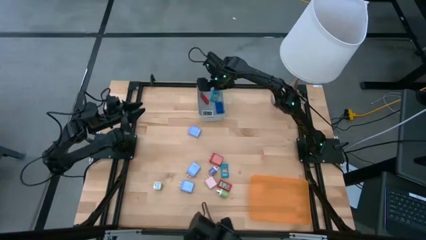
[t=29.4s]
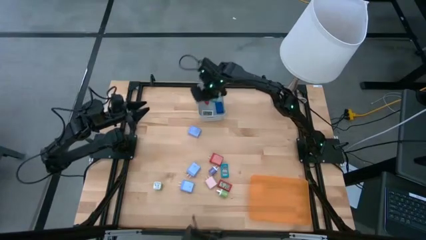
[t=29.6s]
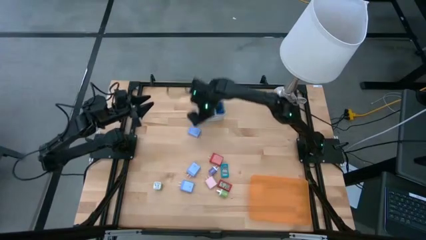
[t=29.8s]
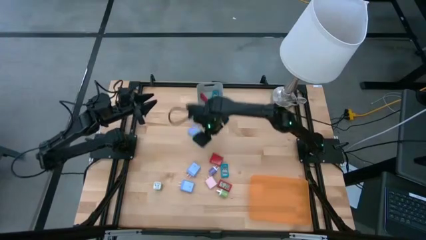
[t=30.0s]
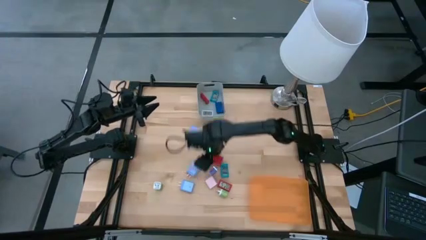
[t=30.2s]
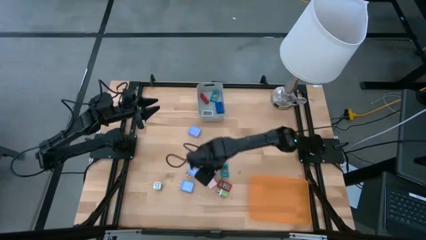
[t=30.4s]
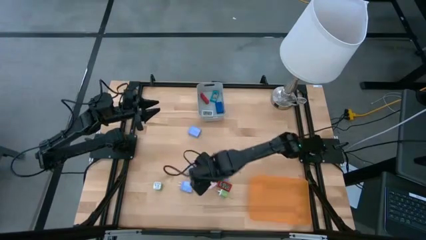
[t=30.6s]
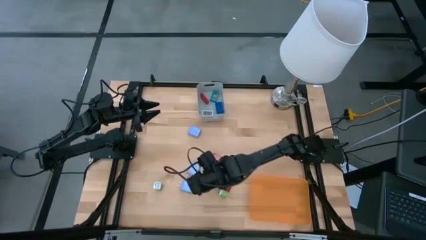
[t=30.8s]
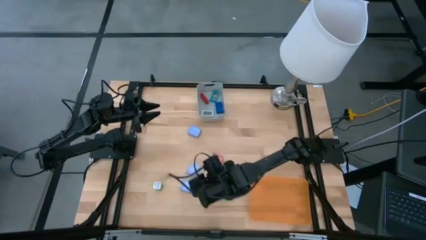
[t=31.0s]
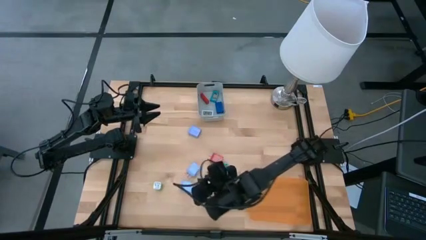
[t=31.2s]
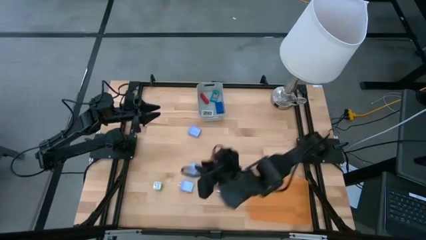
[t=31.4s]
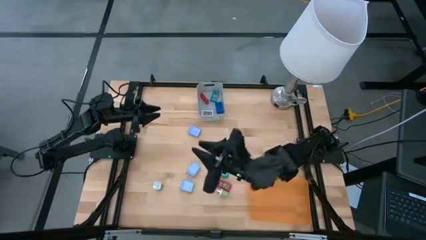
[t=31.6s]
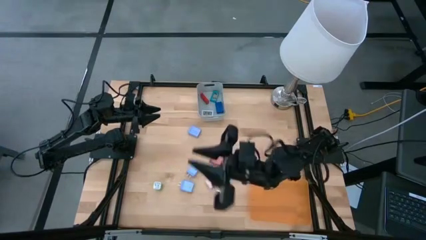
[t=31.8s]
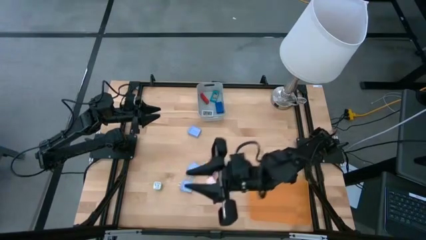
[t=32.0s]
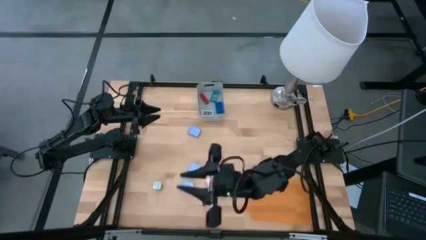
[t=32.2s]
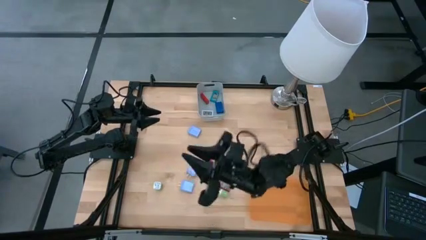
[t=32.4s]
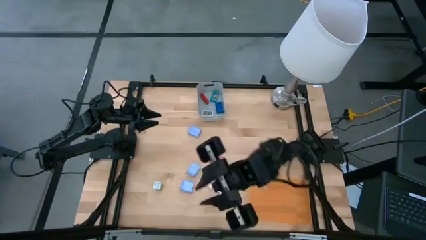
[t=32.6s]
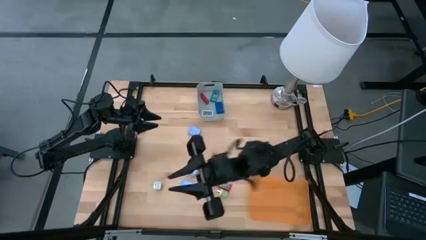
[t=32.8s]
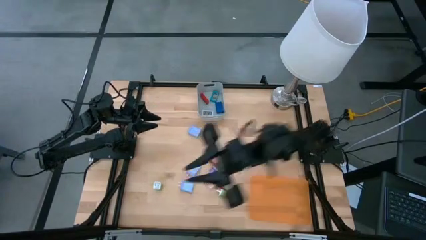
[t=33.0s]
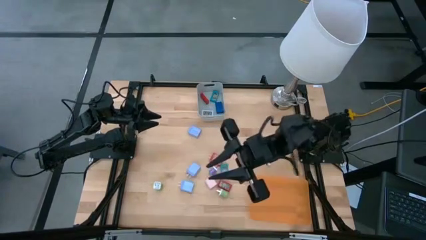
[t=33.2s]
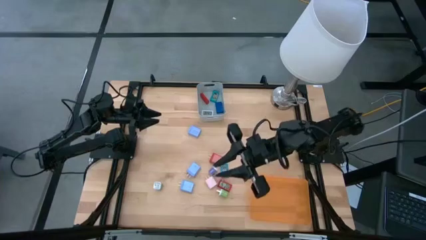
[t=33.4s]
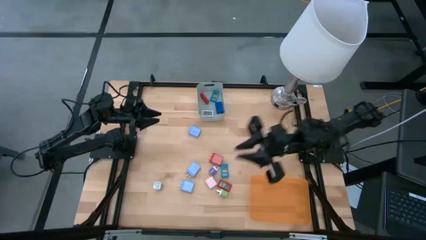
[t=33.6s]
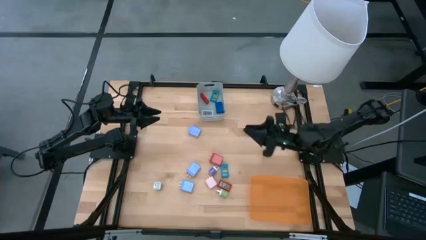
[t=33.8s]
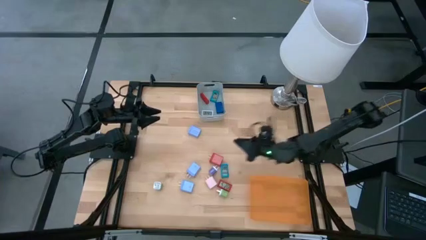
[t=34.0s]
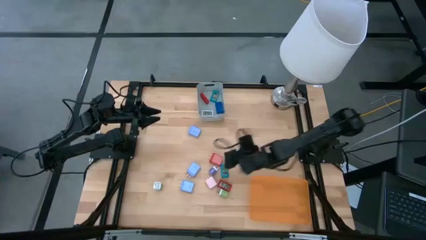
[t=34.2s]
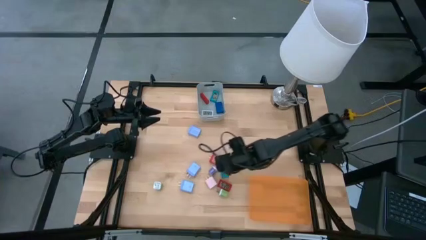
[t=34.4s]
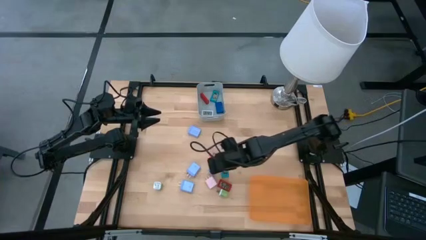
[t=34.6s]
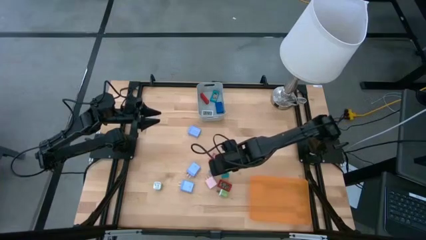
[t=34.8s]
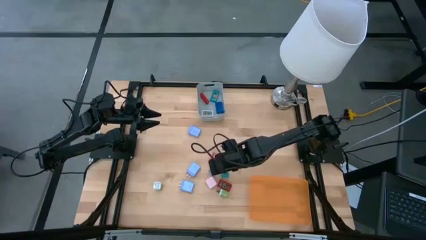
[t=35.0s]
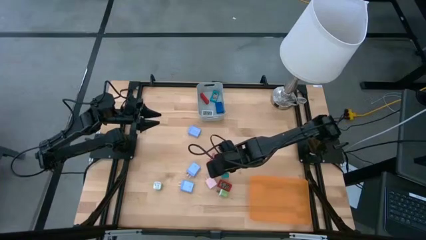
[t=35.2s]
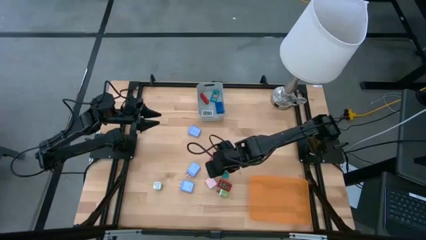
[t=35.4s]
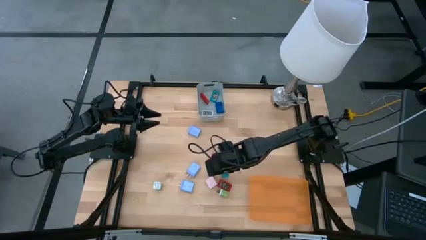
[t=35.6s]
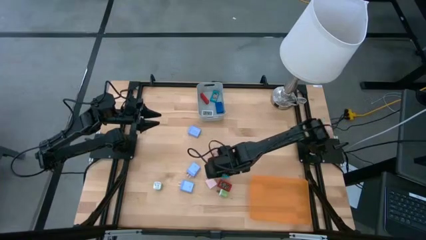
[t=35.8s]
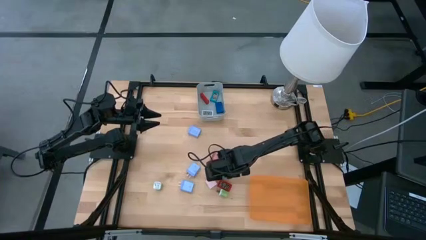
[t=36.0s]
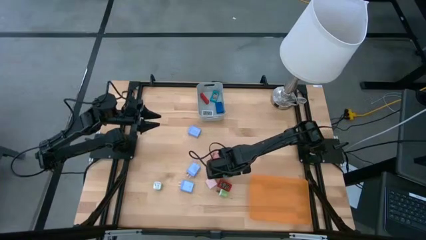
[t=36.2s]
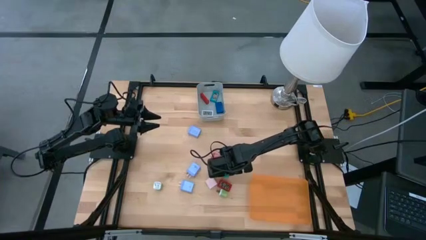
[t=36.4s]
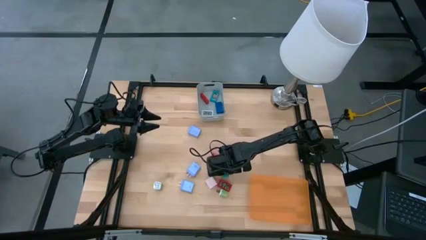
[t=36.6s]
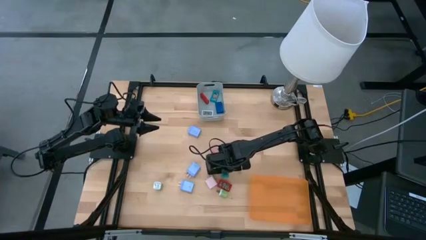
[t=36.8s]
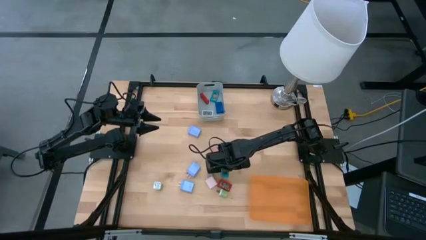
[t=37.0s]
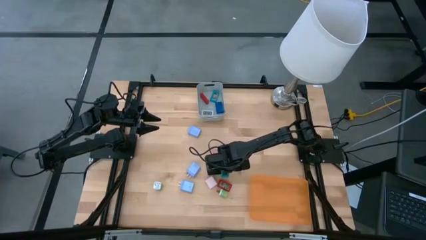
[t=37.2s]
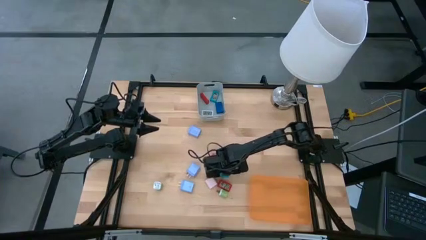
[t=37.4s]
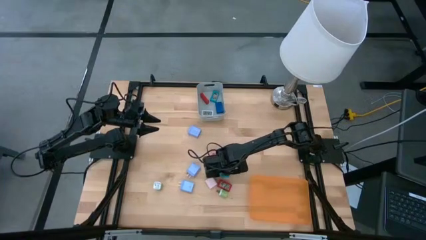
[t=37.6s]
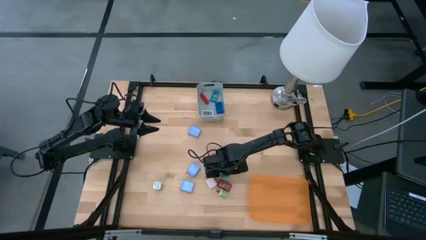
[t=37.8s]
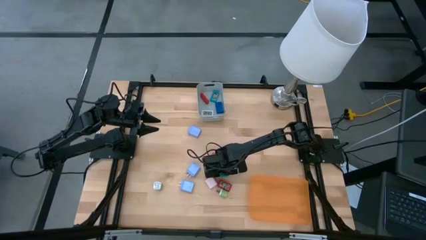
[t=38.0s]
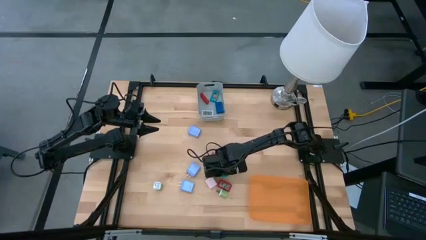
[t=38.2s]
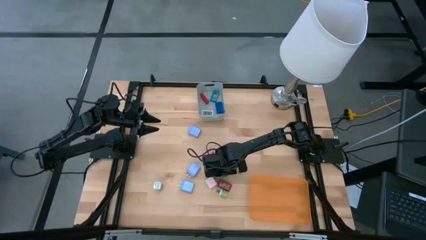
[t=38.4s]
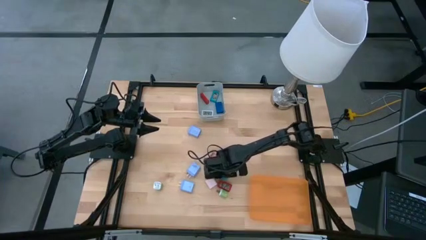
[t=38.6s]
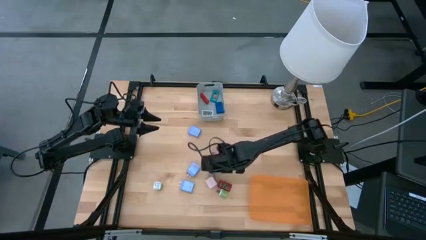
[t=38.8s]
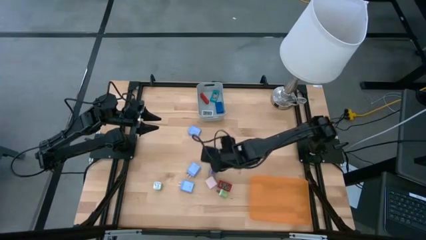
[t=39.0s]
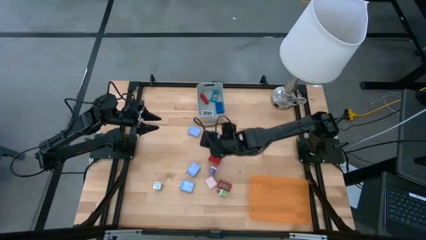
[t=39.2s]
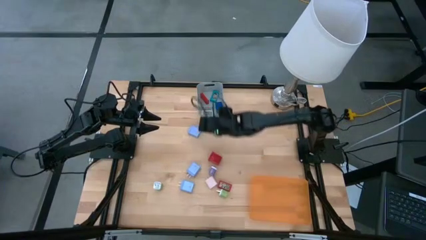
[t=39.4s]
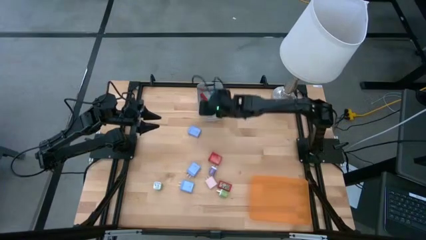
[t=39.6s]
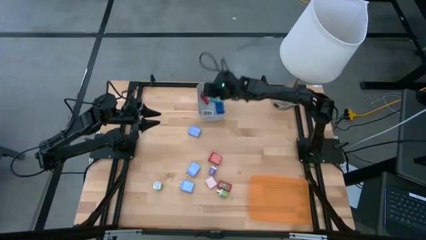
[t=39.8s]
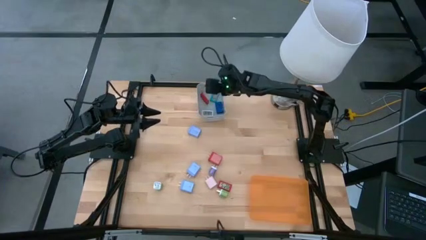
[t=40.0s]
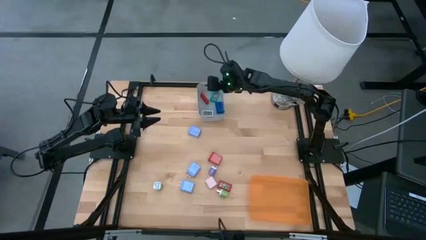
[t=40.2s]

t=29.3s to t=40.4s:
Task: Pick & Place Office items
Put the blue digital timer into the gray bin

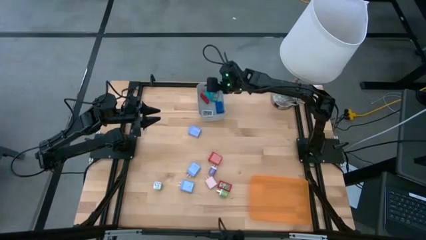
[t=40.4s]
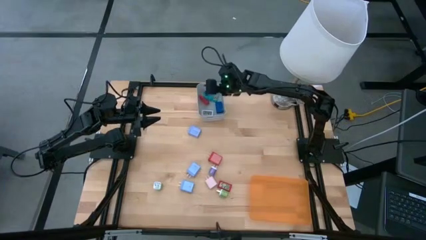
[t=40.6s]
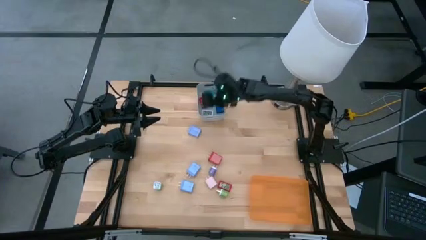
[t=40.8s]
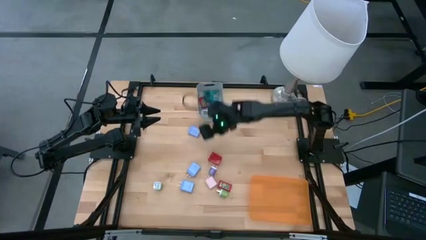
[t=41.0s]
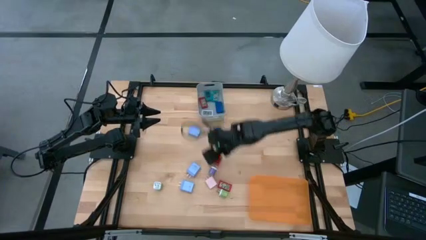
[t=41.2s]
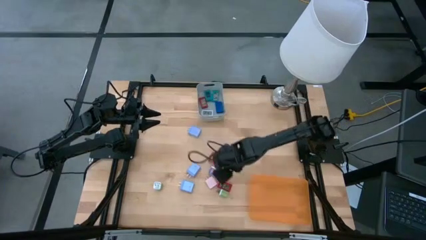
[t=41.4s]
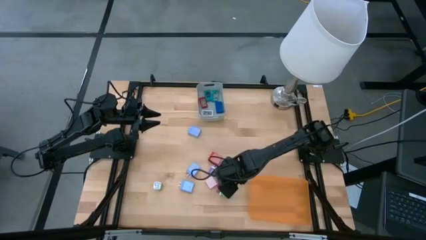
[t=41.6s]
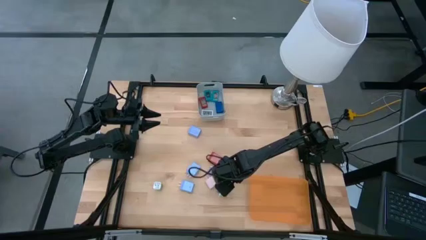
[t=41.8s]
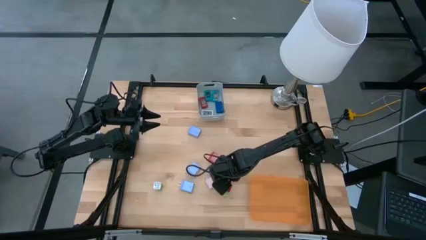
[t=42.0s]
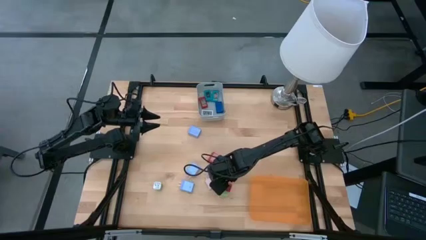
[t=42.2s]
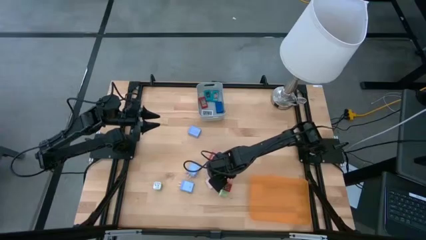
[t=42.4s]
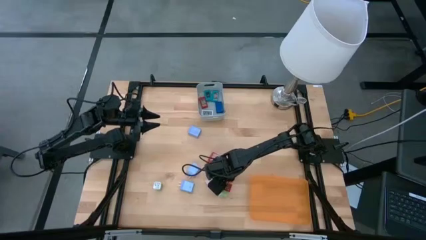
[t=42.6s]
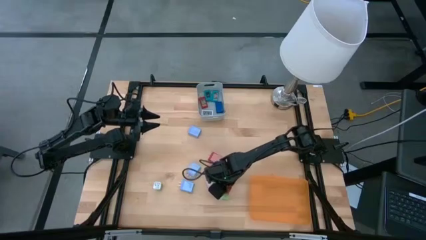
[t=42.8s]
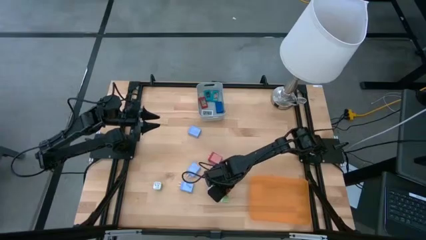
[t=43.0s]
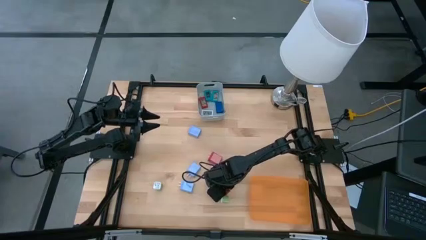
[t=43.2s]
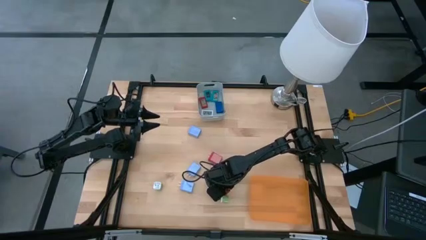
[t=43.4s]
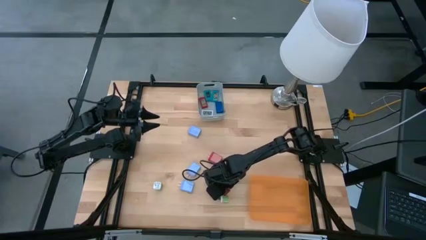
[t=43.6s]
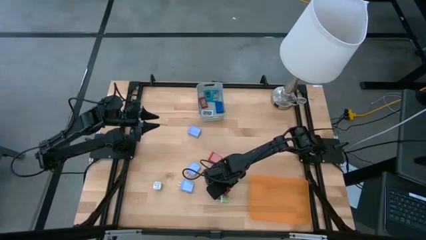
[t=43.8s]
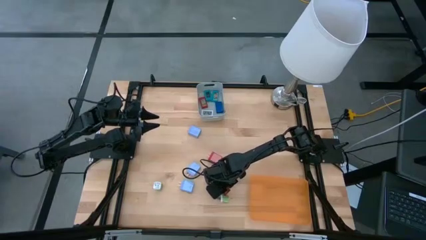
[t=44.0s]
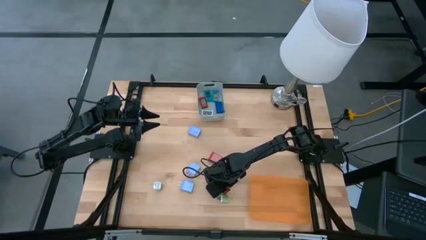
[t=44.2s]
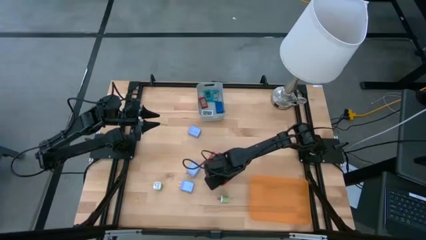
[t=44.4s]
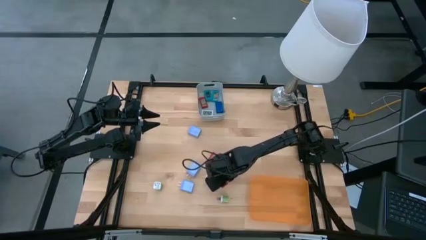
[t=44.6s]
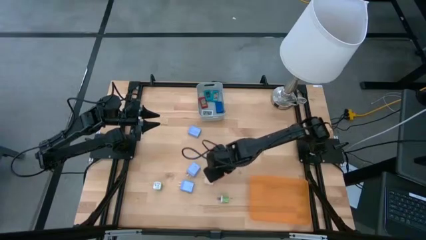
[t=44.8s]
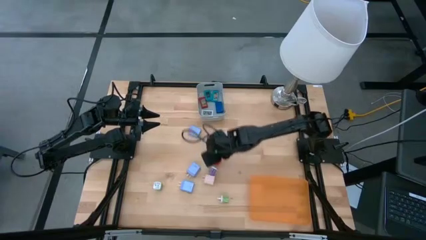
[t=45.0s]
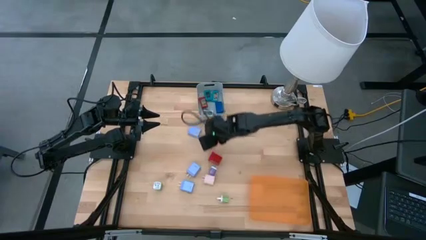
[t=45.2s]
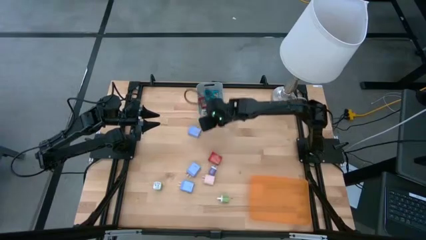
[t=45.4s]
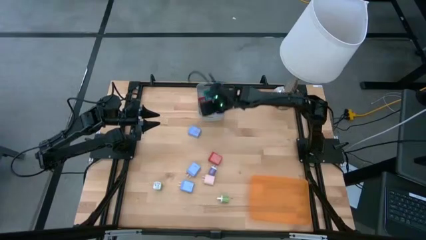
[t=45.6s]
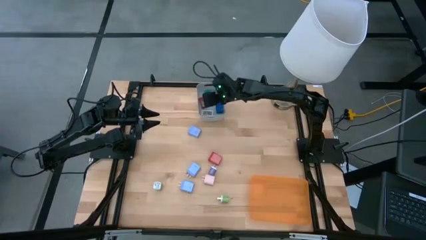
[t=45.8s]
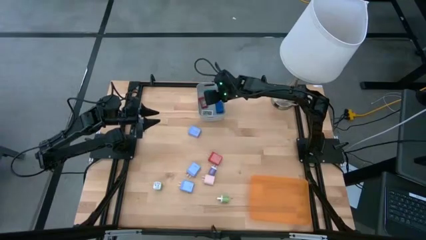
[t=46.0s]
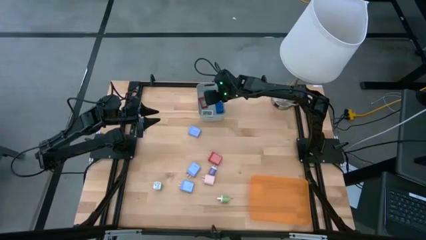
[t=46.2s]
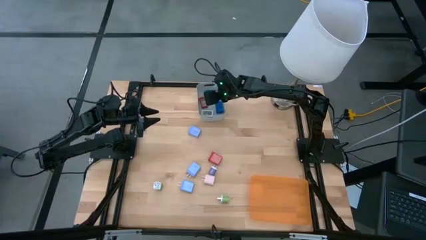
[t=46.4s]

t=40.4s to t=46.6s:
Put the red digital timer into the gray bin
